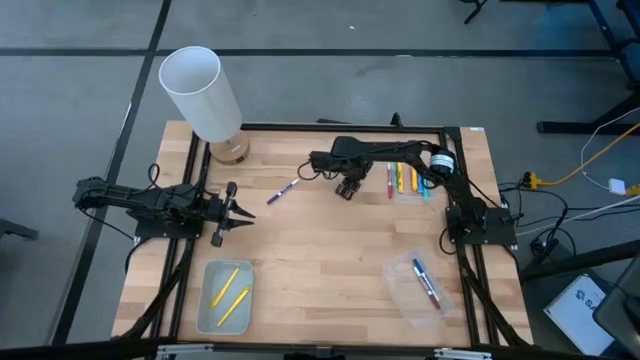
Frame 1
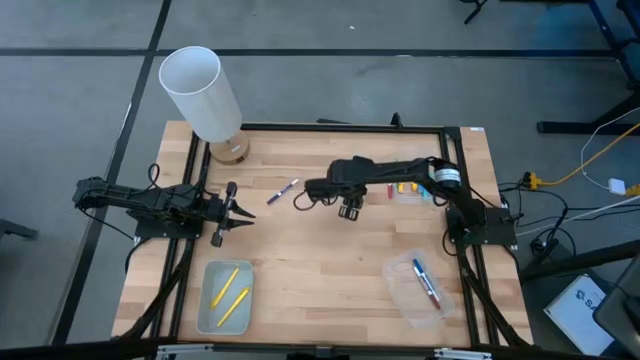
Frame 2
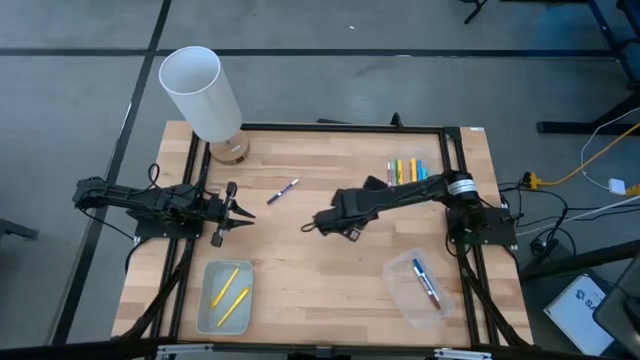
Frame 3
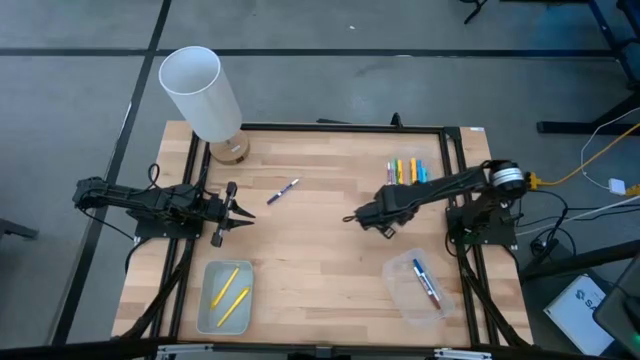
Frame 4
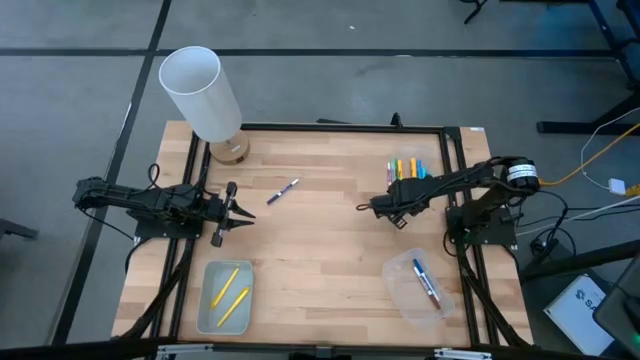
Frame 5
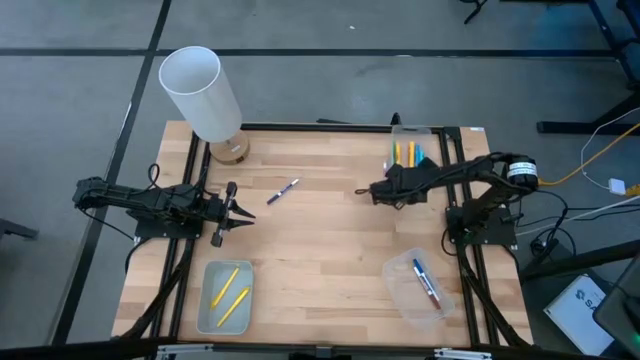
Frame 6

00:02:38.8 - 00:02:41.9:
Task: Pick & Place Markers
Move the top transparent bin to the top right of the table

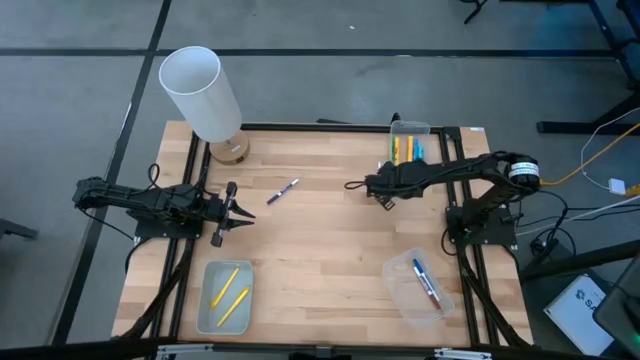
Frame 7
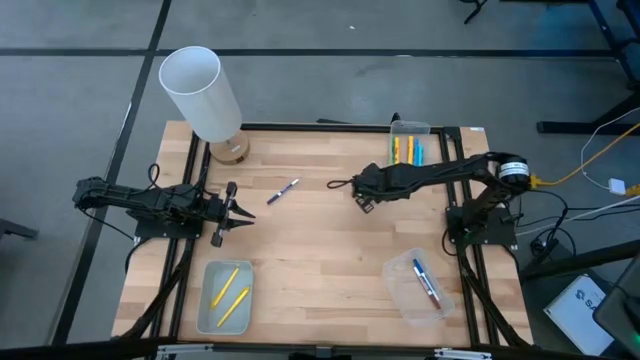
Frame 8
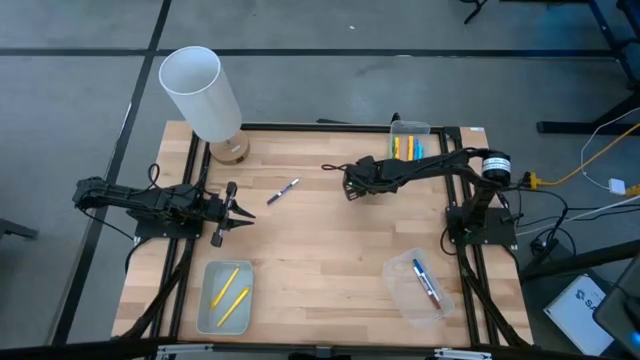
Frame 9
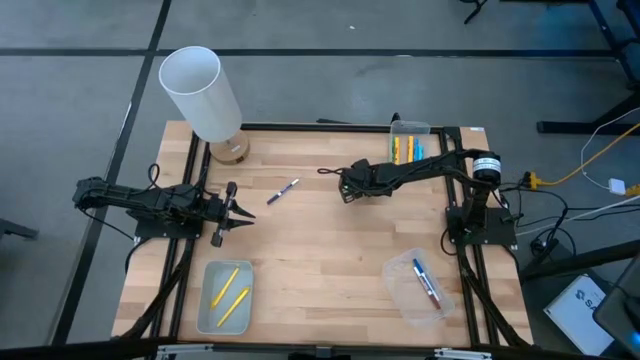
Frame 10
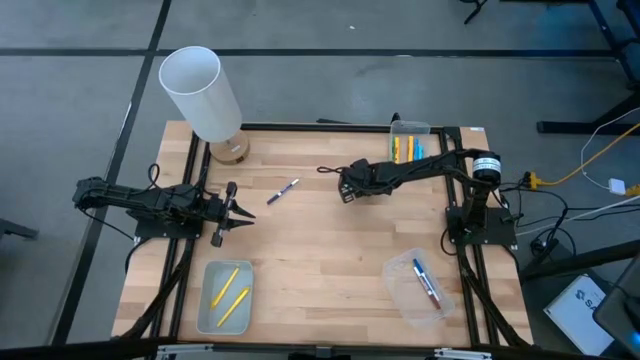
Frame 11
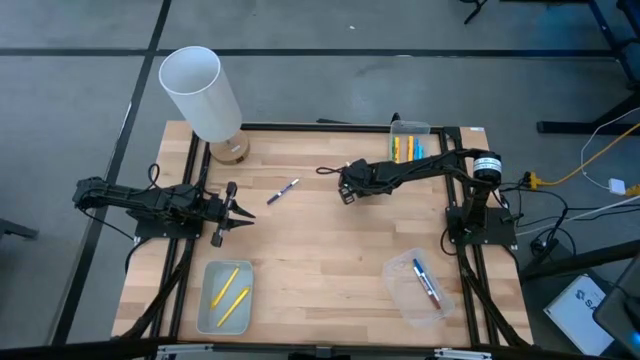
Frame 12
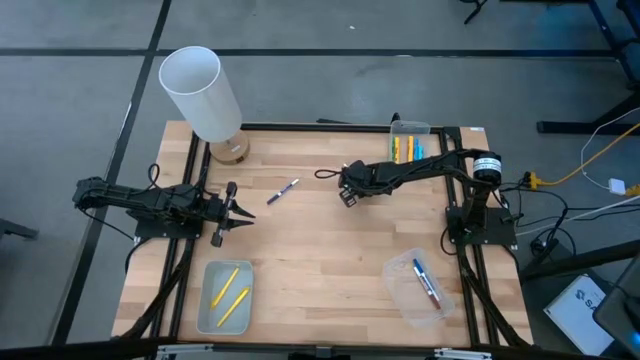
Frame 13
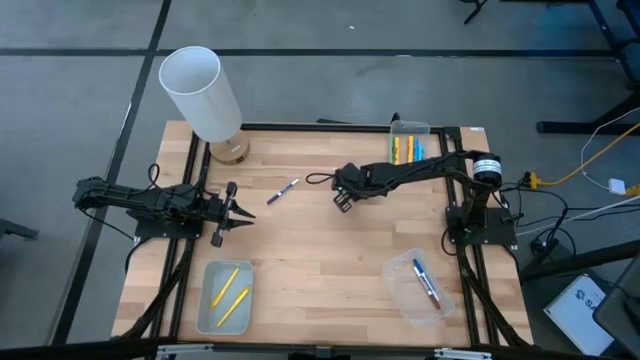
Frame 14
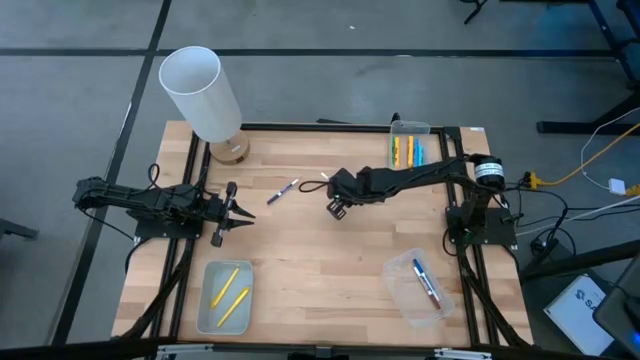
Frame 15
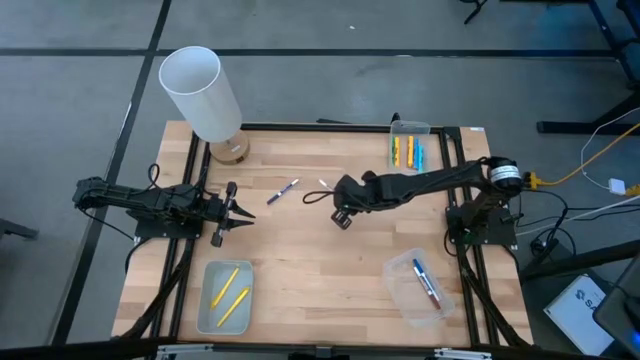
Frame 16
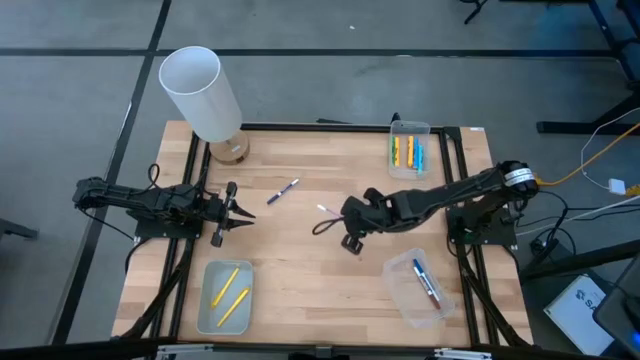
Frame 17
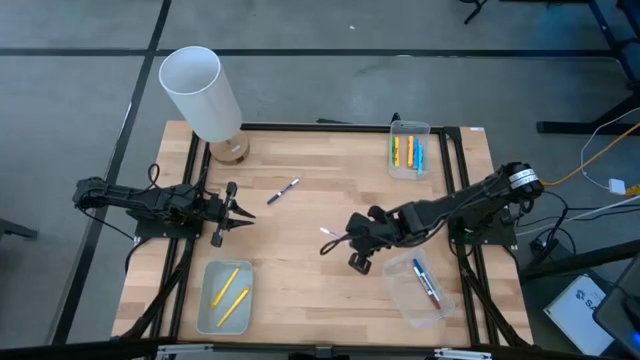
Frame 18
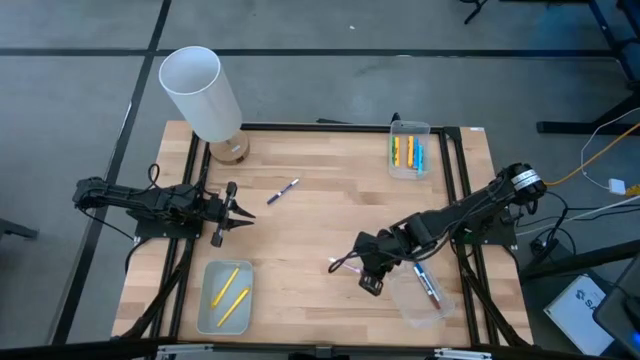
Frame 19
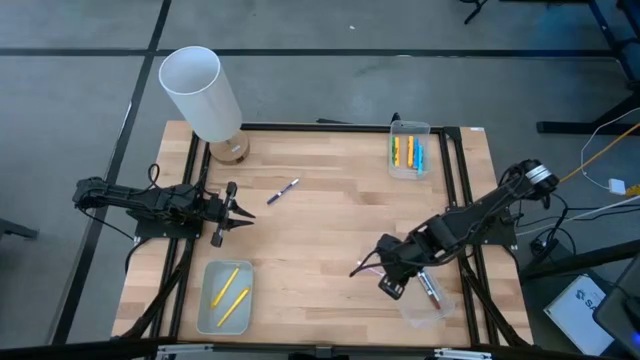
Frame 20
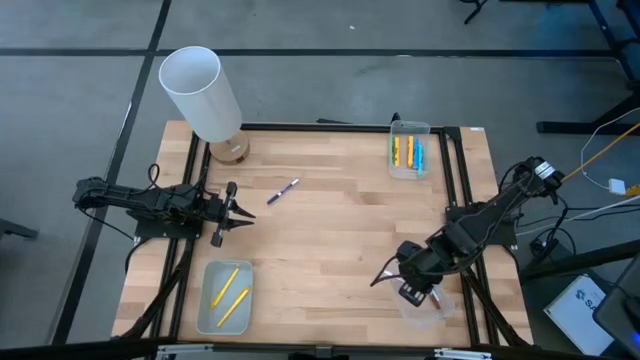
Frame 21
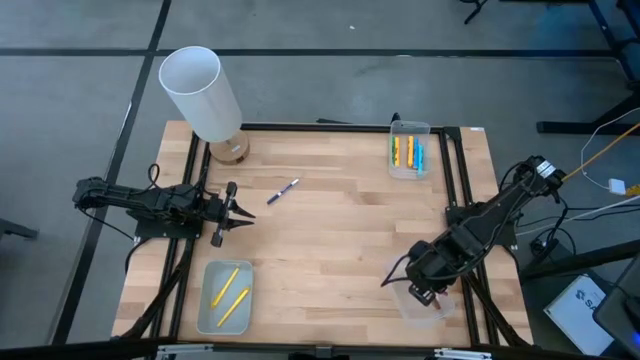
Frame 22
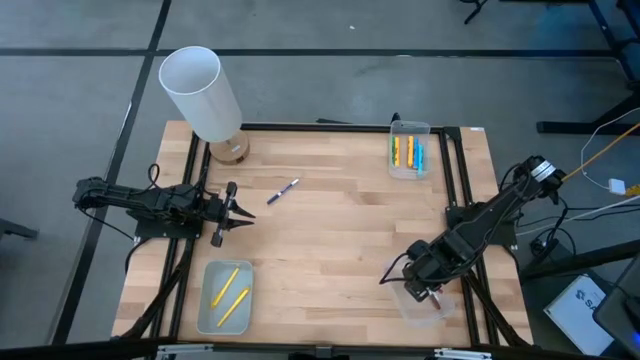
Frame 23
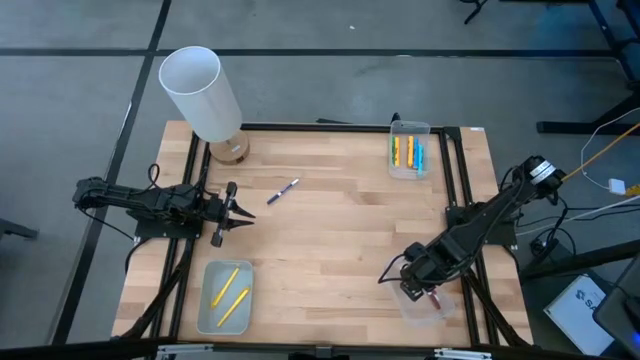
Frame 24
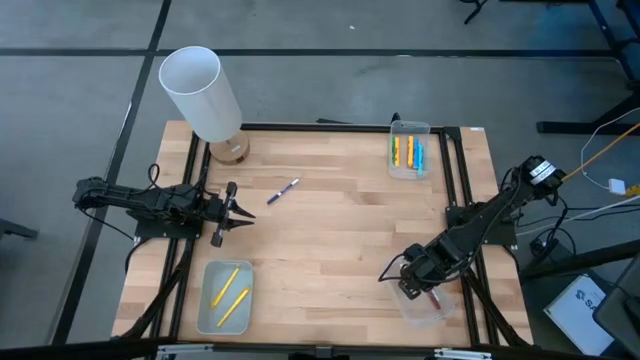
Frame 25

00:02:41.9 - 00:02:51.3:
Put the pink marker pen into the bottom transparent bin

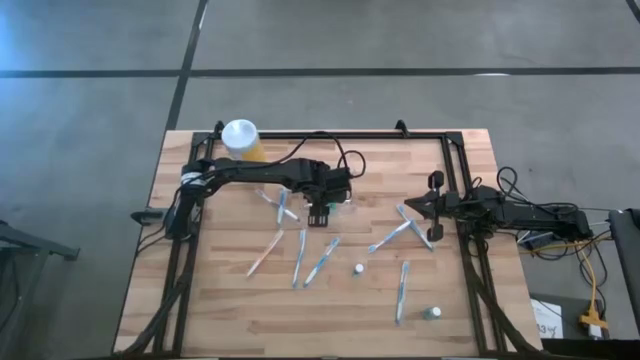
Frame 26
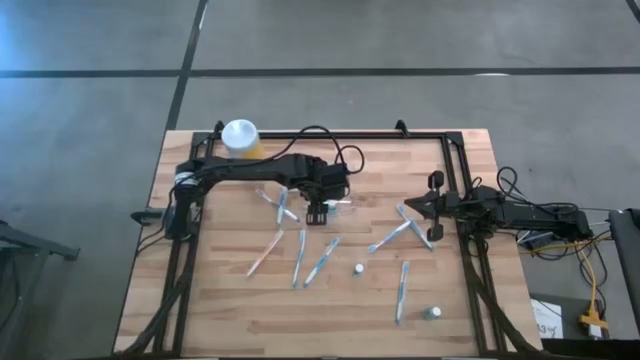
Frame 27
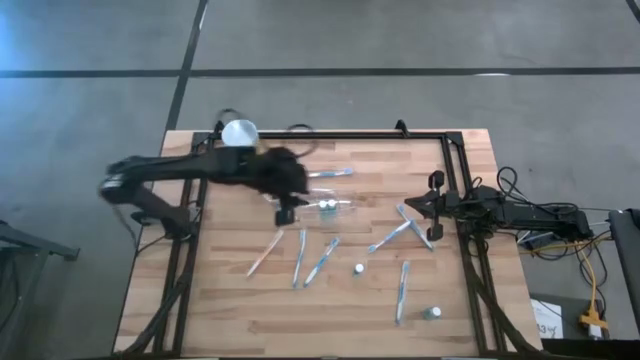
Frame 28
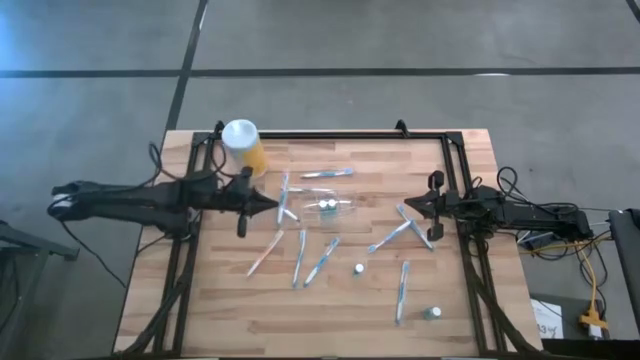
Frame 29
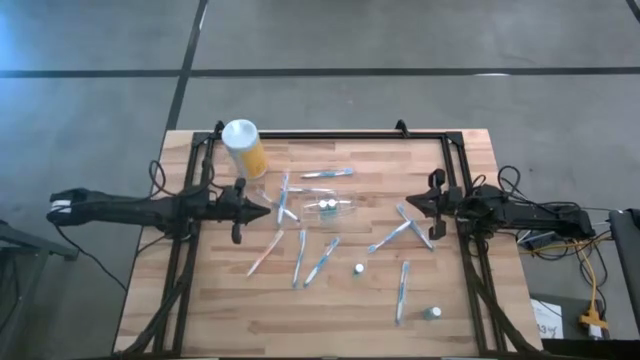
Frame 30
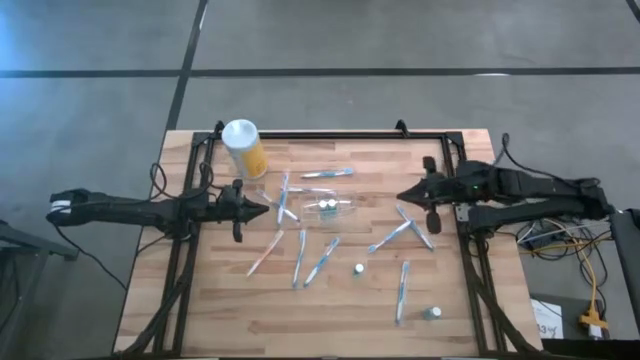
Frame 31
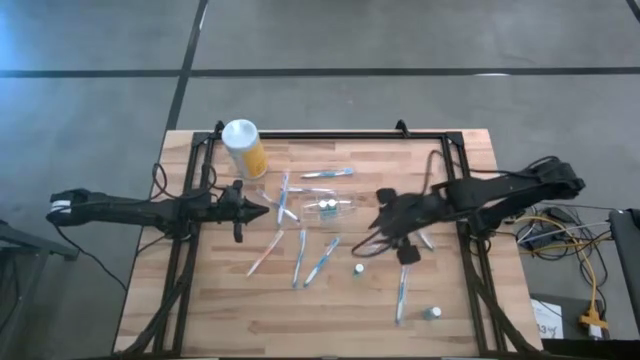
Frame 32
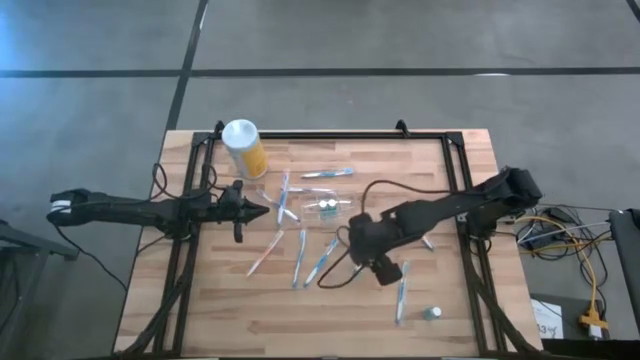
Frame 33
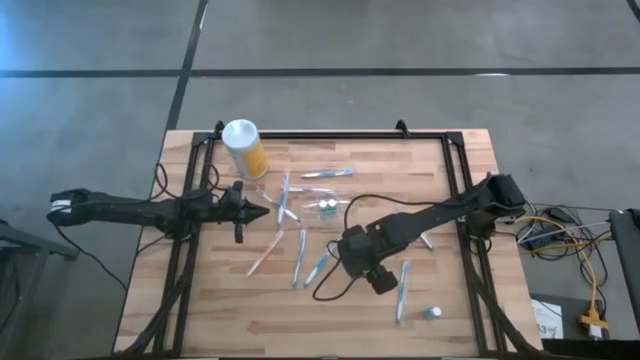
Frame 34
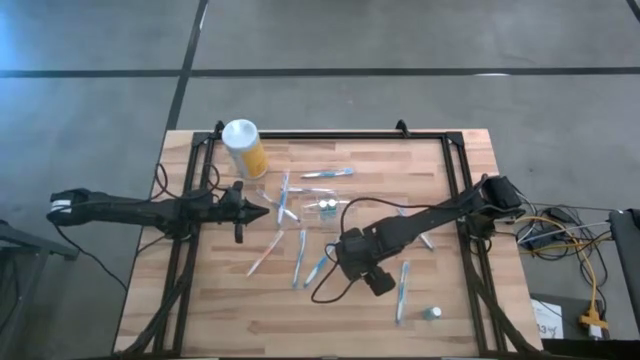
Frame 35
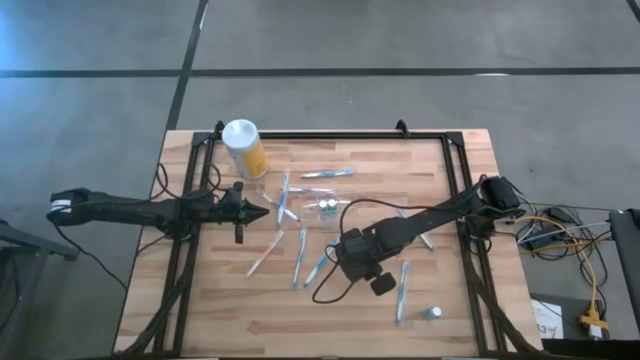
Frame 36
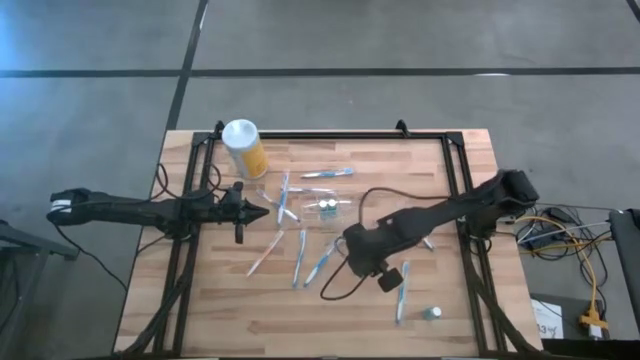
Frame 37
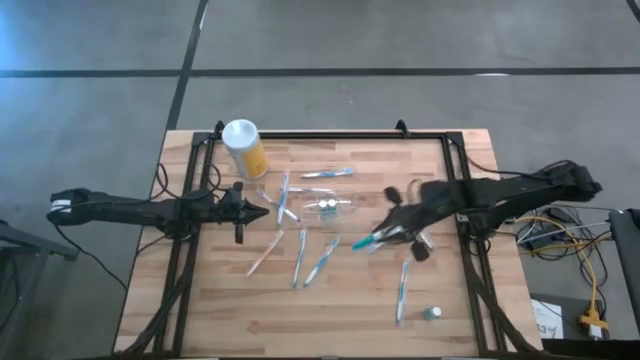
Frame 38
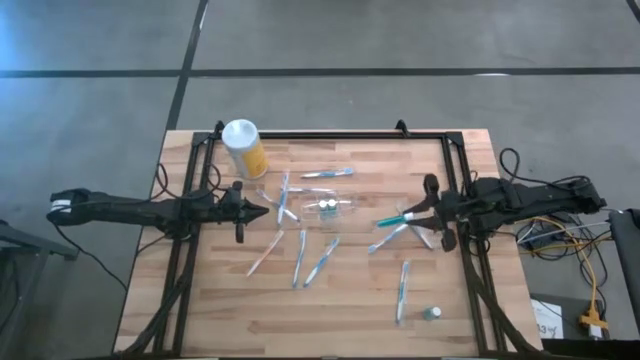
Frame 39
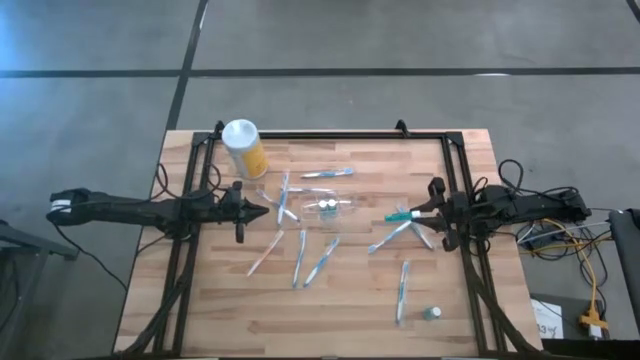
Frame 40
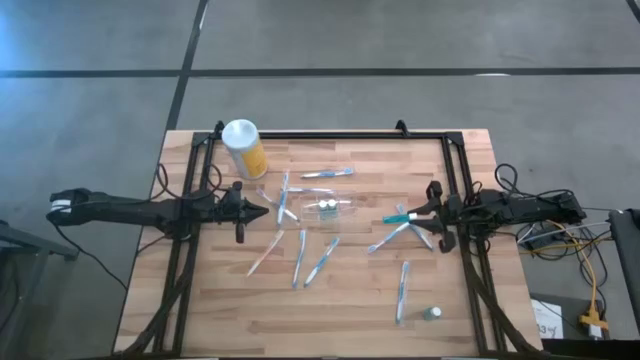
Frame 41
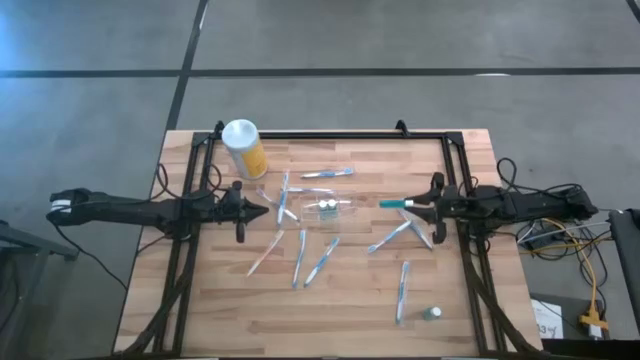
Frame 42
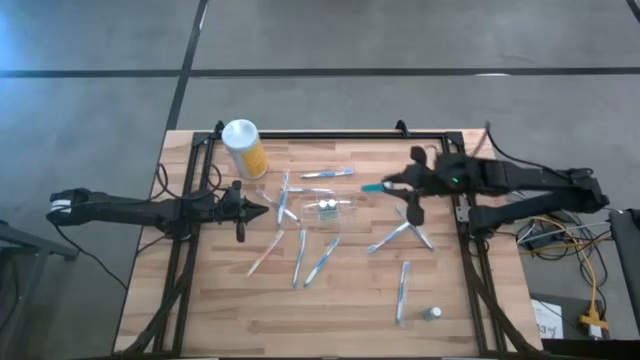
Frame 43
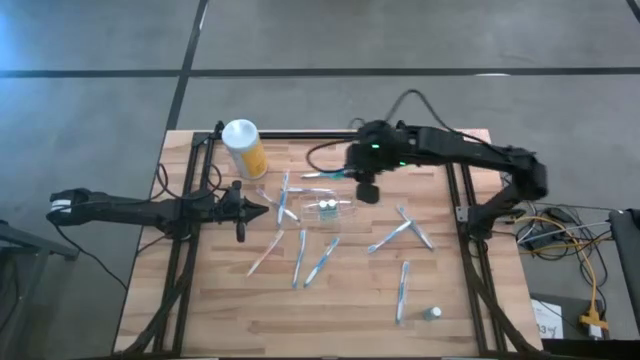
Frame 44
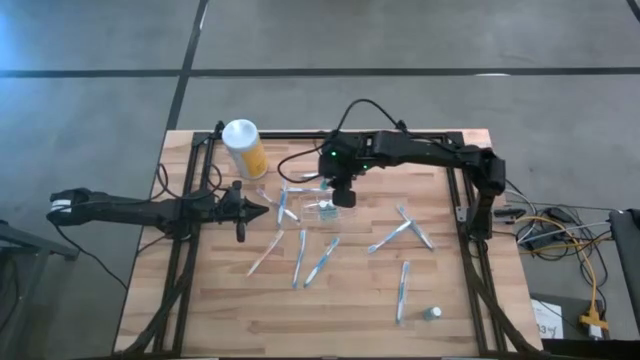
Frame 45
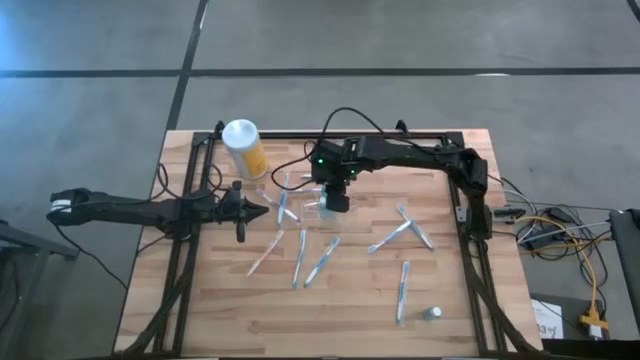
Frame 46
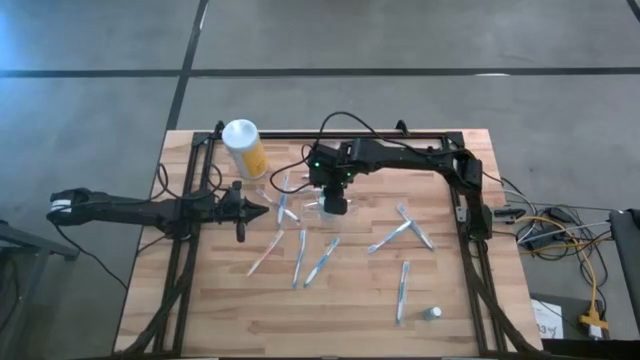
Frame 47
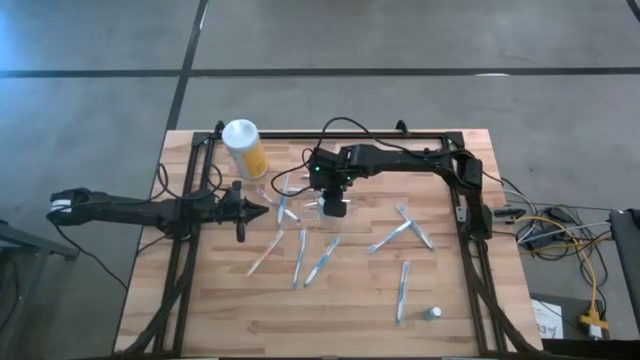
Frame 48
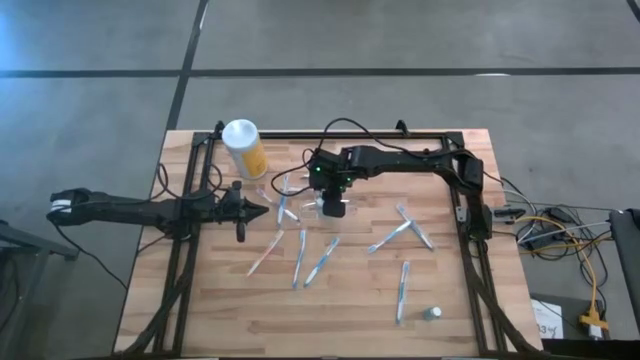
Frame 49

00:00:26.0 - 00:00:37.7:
Task: Pick & Place toothbrushing station
Put the top mouthwash into the middle section of the transparent organizer
